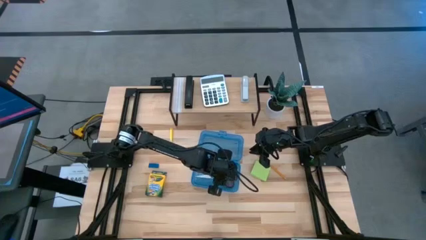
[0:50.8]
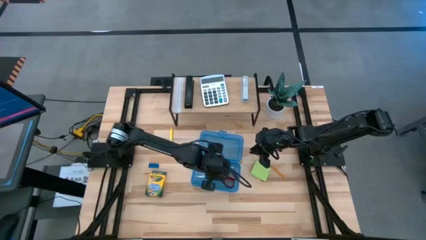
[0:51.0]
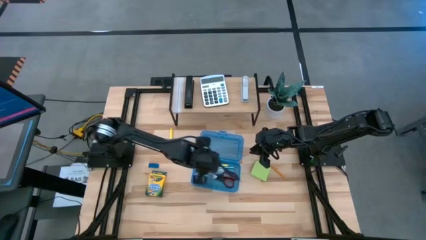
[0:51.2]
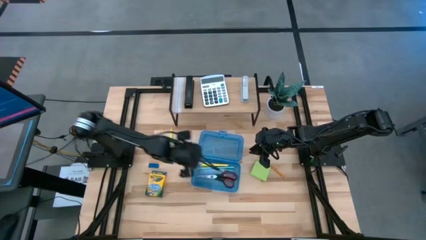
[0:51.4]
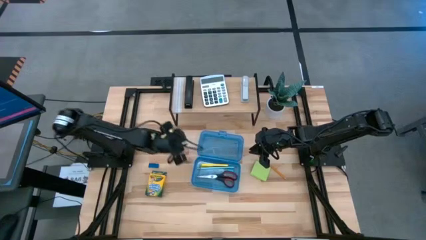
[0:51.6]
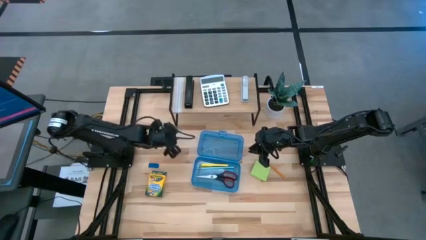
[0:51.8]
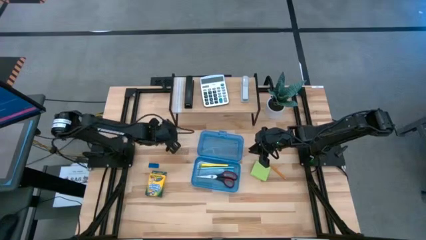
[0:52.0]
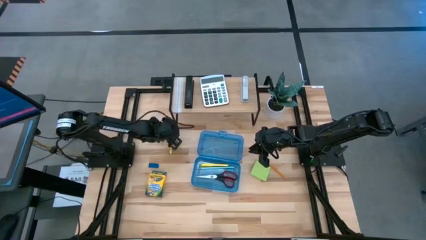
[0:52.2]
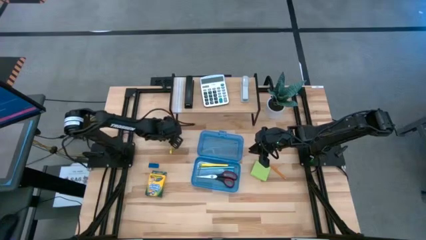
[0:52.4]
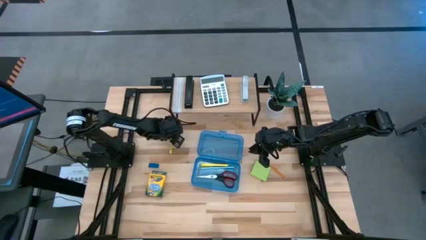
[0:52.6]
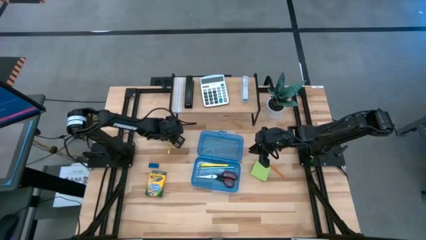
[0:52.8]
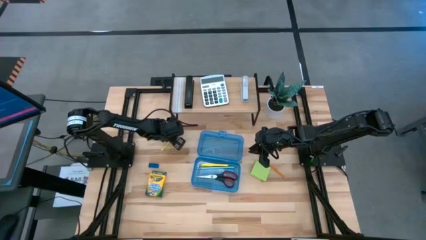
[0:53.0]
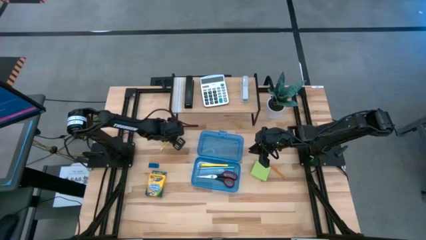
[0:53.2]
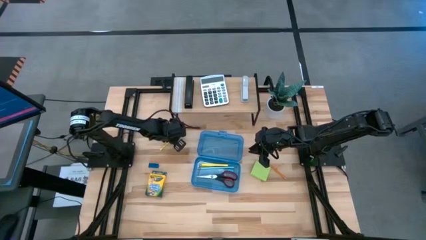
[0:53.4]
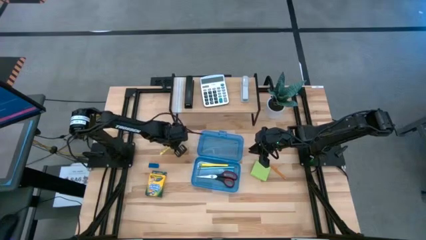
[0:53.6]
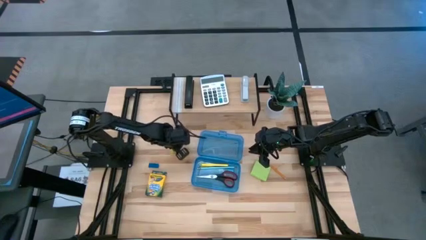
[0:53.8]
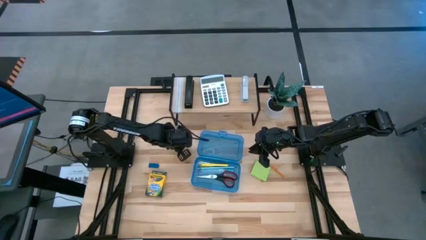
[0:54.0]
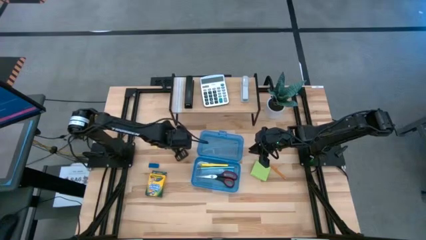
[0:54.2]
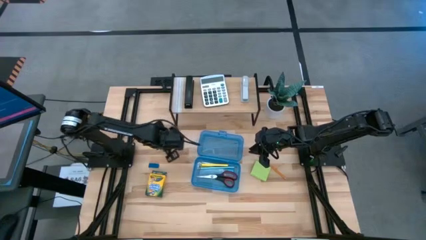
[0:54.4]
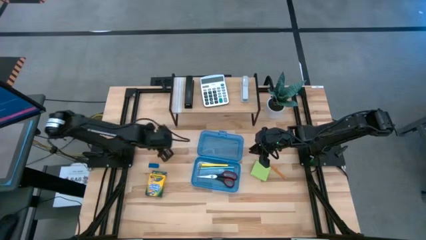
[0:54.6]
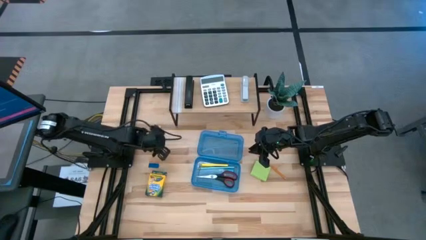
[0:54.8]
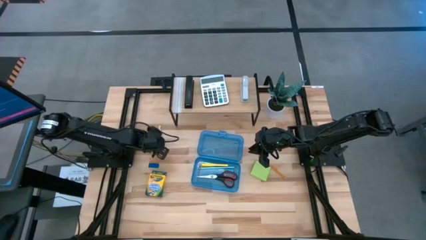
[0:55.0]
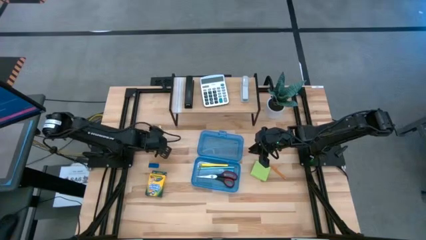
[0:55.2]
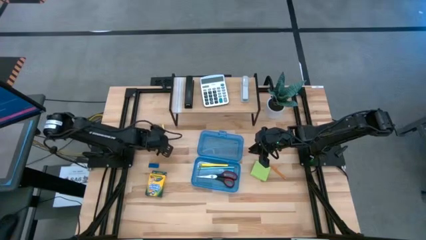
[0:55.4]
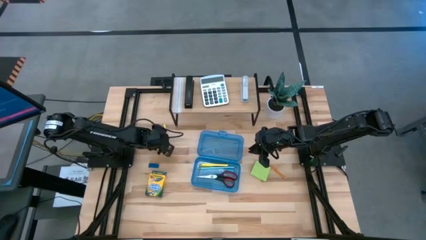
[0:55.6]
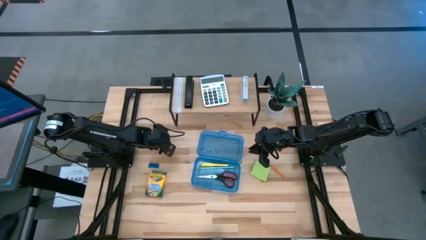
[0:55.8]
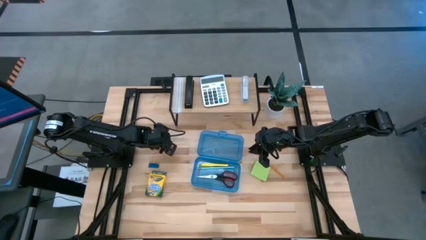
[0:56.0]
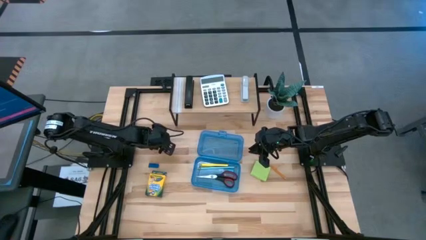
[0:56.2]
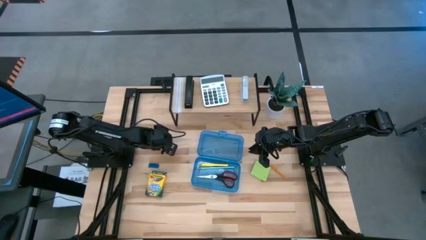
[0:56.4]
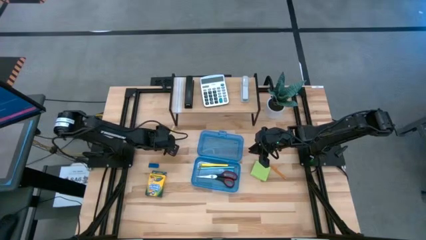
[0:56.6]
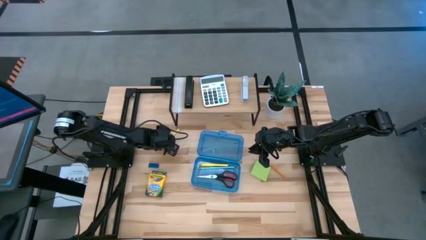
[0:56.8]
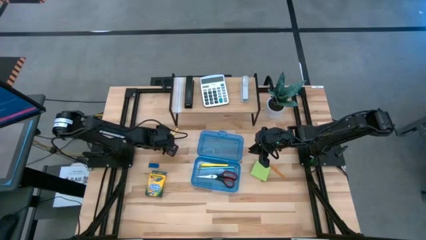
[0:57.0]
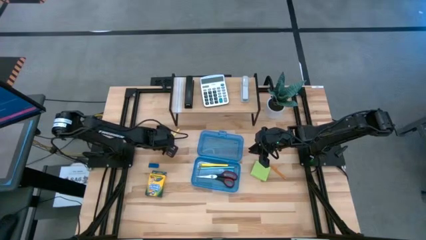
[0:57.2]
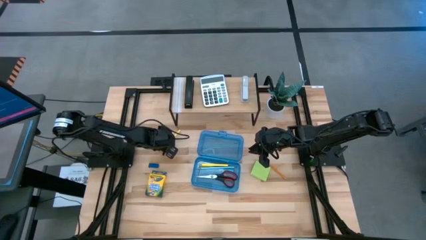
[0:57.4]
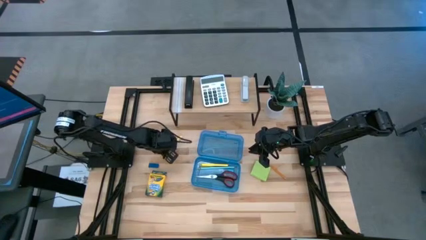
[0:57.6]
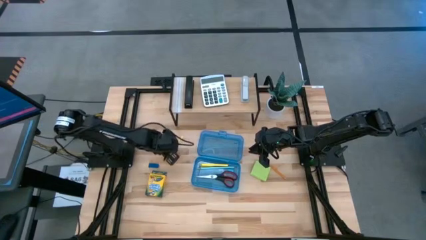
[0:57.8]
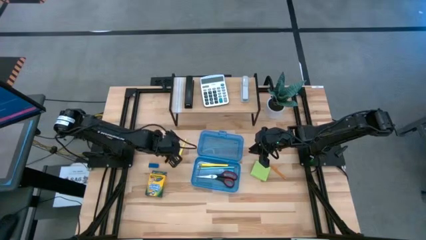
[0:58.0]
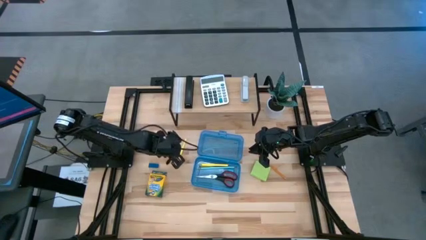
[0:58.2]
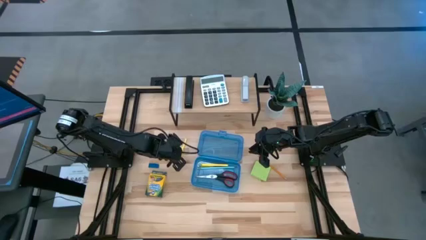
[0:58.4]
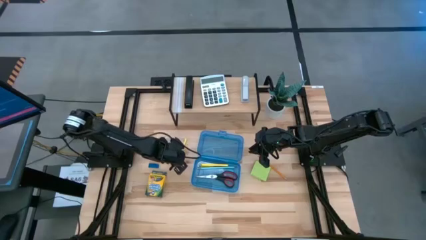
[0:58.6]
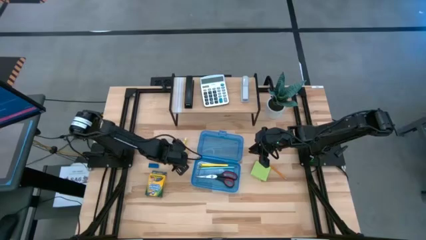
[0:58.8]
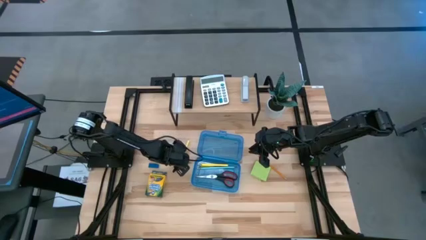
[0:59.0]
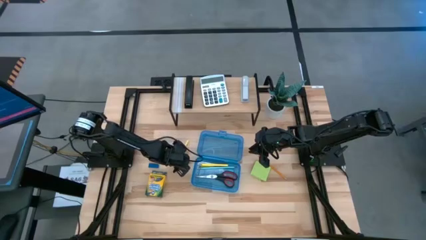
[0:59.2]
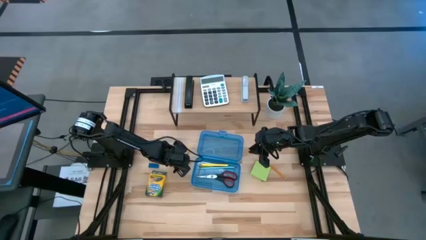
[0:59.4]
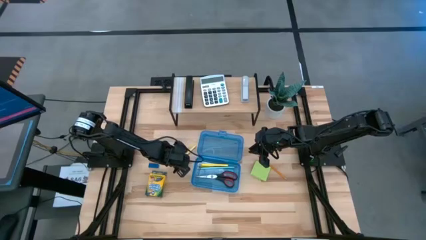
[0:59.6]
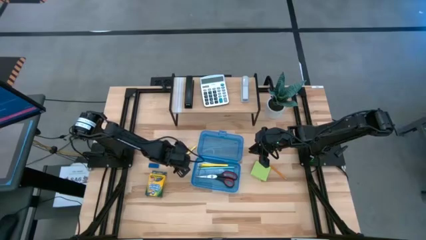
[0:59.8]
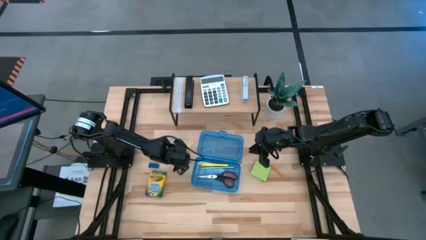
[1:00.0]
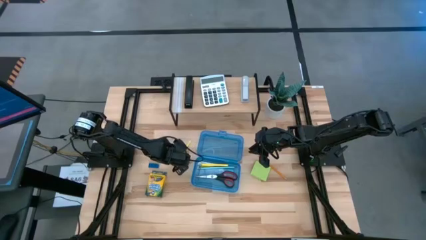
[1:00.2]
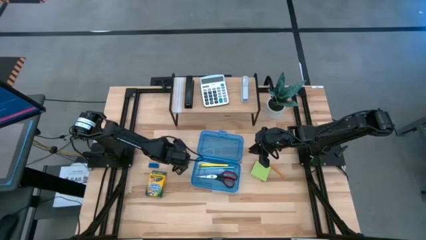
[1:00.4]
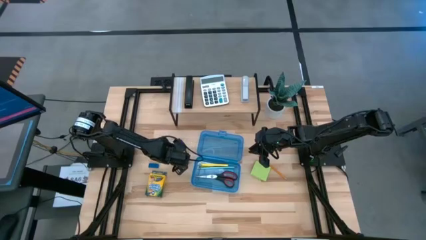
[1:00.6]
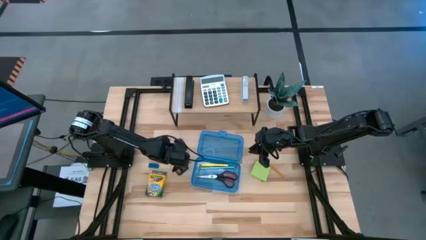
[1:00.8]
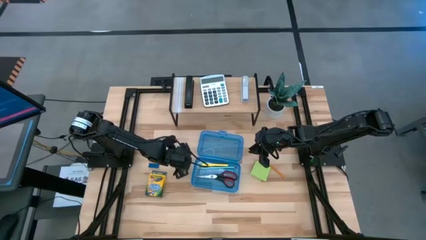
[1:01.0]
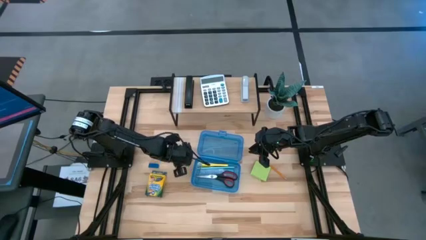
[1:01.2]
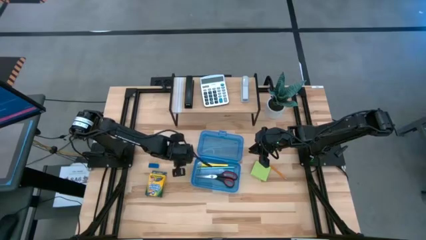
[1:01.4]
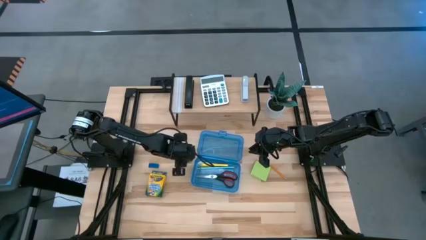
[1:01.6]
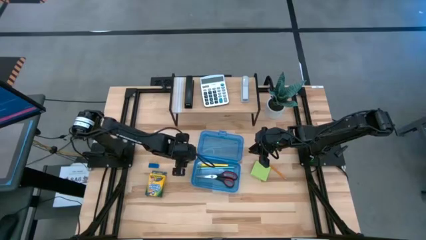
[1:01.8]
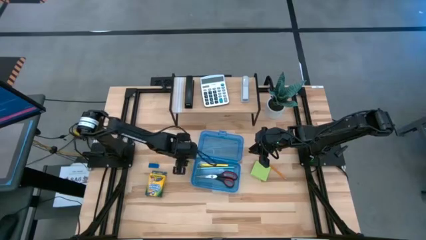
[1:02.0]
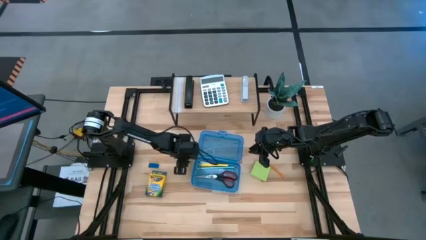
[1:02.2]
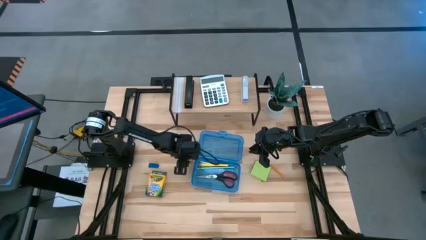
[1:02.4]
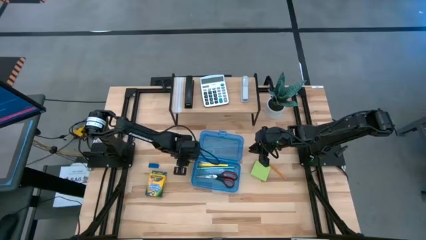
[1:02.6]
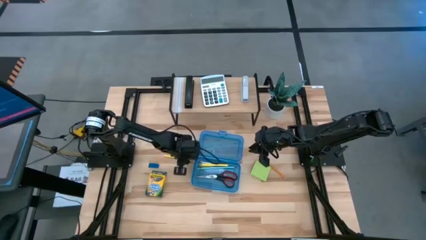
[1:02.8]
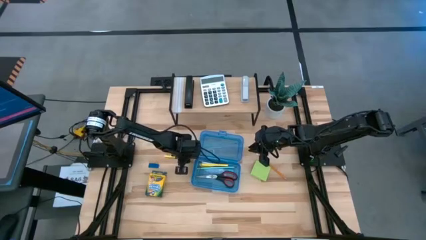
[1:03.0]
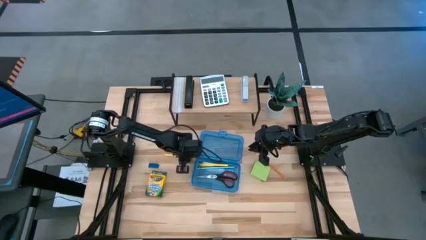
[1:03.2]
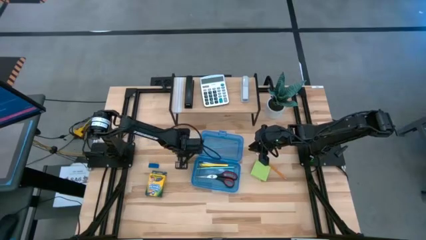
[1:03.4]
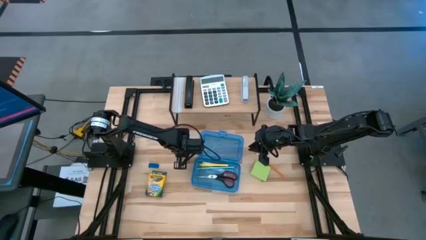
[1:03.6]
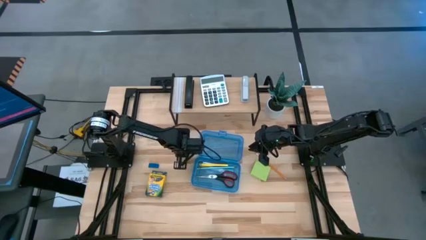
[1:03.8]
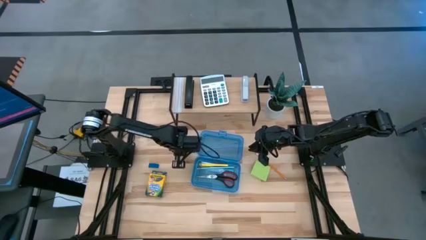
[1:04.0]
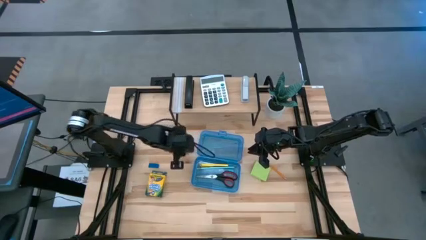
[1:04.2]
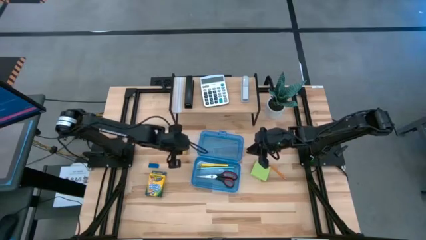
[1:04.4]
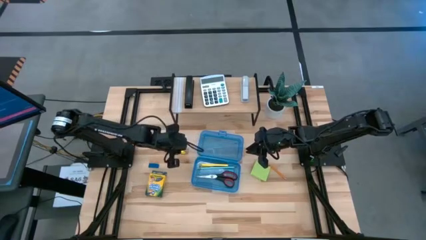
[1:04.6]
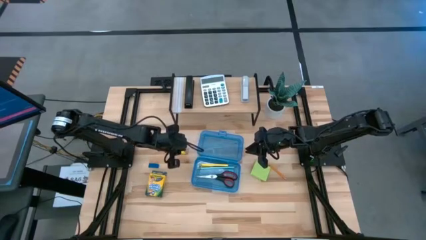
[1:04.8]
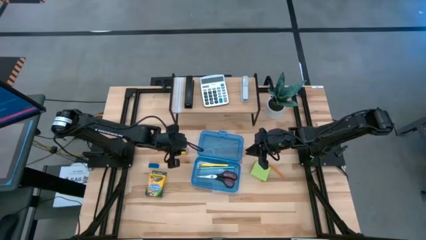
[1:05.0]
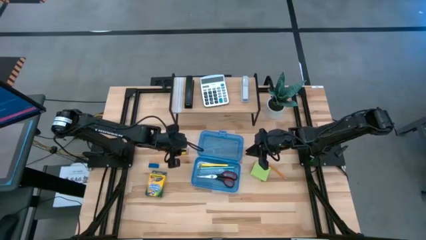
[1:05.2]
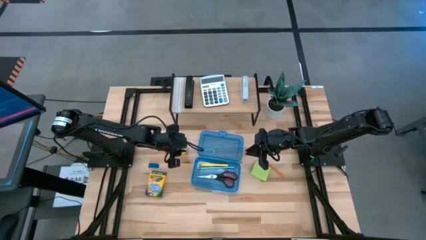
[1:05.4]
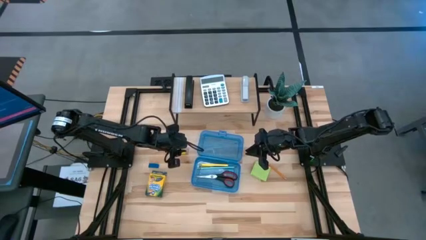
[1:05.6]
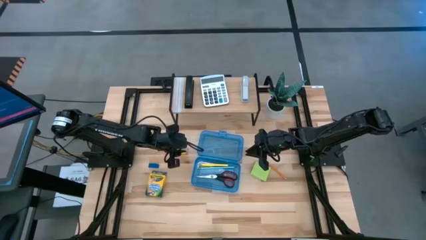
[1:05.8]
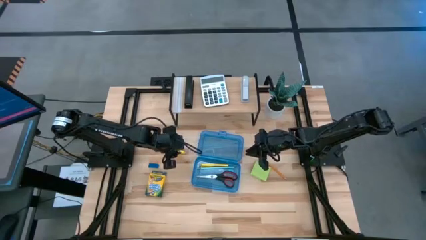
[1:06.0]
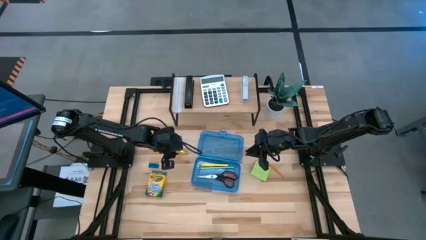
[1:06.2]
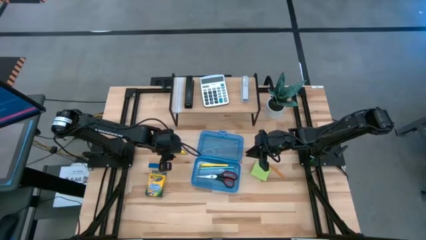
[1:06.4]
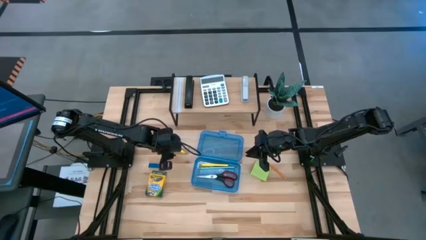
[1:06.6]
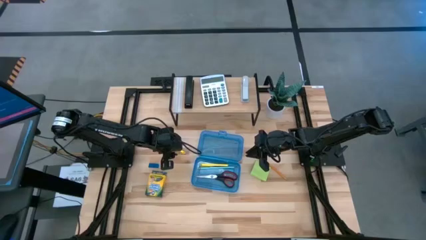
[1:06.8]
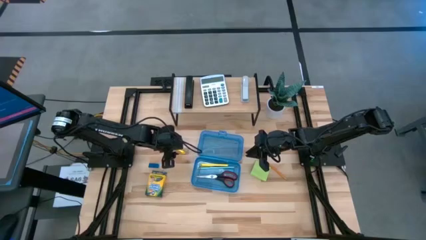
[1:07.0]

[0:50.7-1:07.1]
Task: Pack school essentials
Put the yellow pen into the blue supply box
